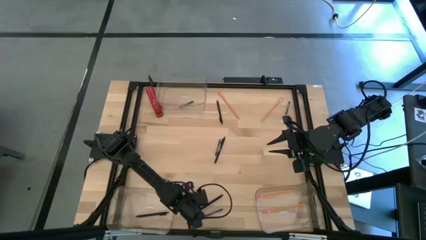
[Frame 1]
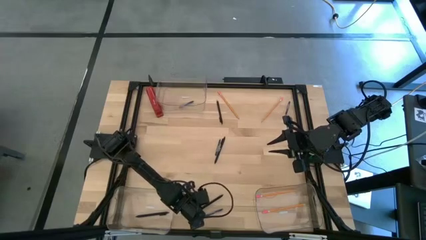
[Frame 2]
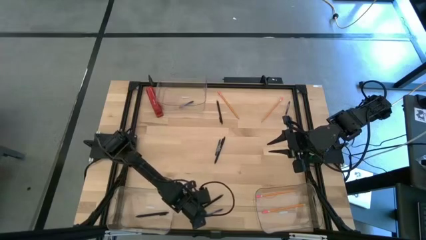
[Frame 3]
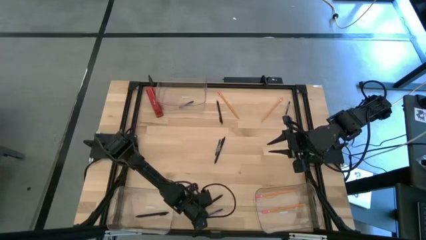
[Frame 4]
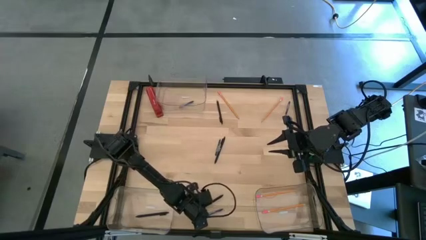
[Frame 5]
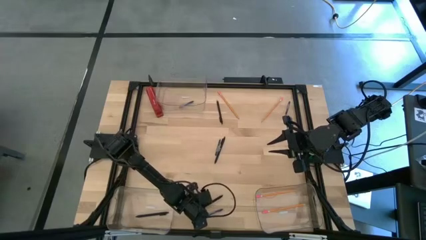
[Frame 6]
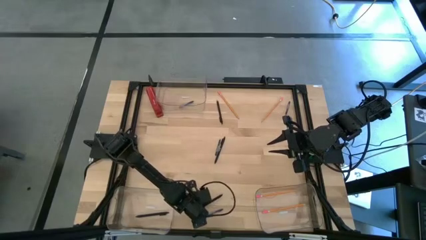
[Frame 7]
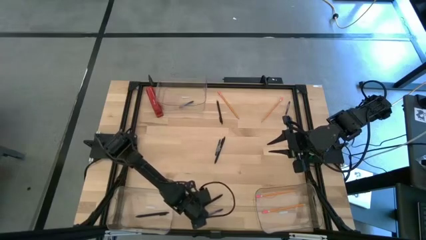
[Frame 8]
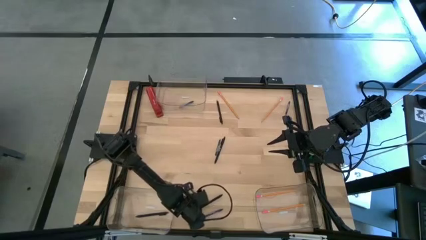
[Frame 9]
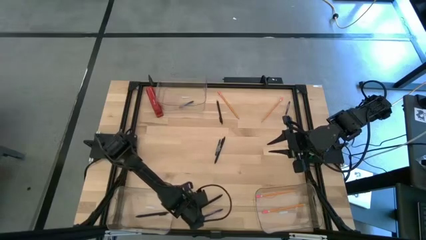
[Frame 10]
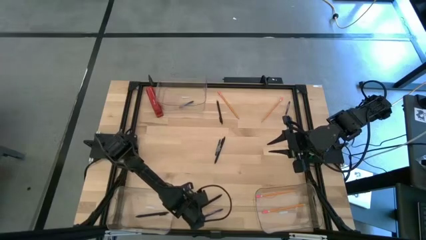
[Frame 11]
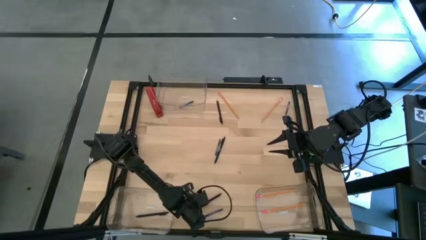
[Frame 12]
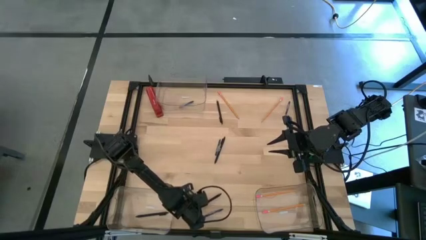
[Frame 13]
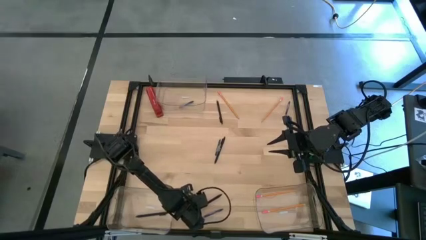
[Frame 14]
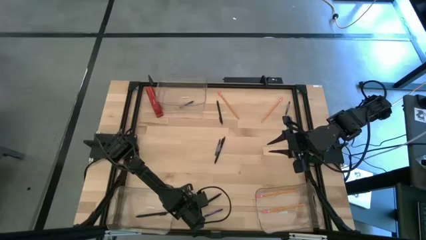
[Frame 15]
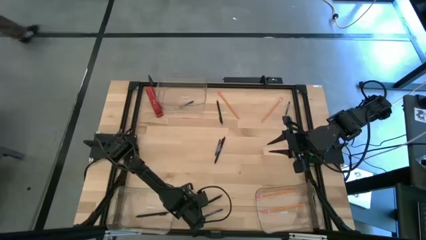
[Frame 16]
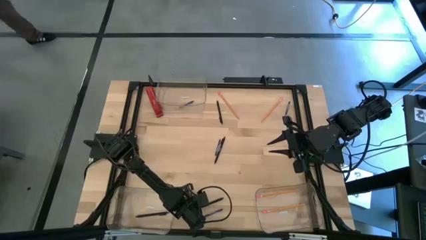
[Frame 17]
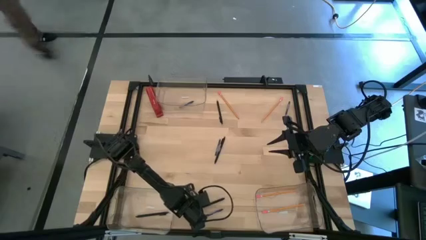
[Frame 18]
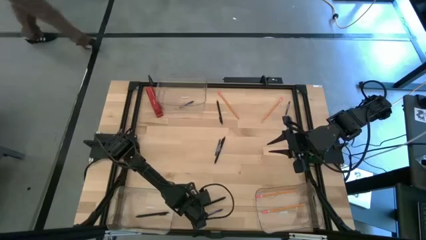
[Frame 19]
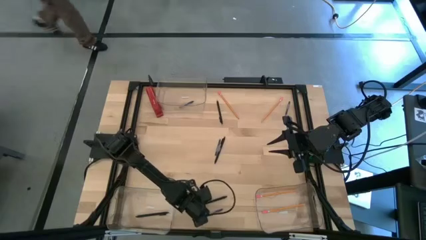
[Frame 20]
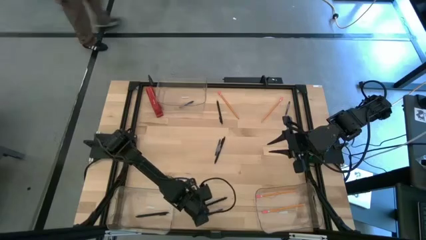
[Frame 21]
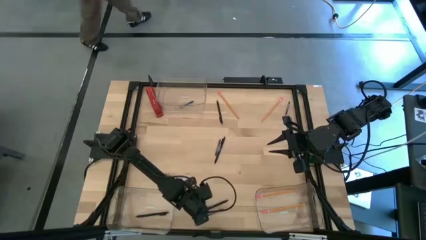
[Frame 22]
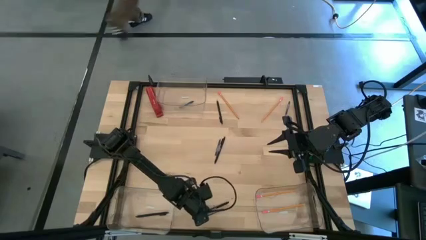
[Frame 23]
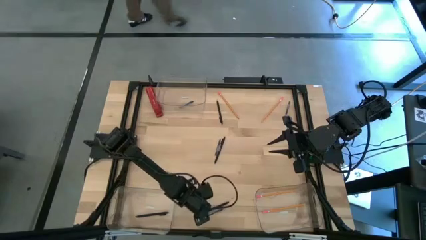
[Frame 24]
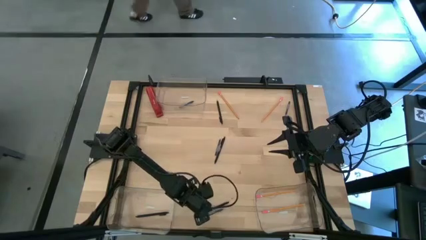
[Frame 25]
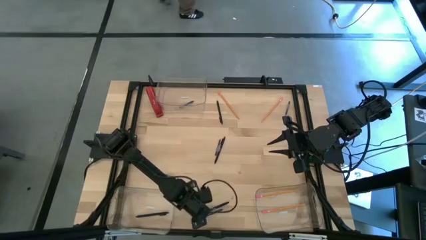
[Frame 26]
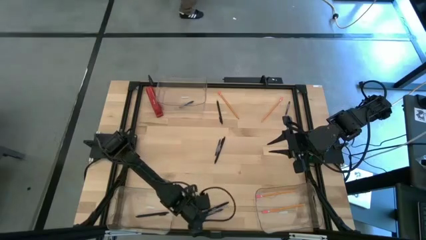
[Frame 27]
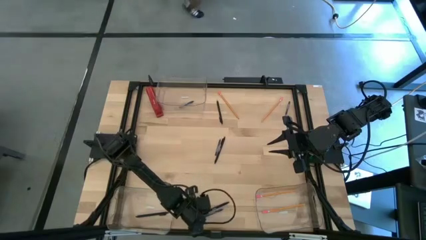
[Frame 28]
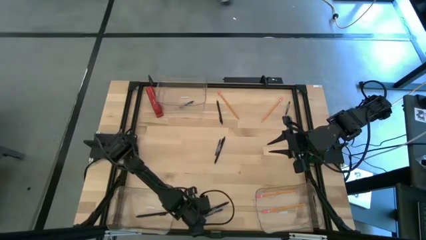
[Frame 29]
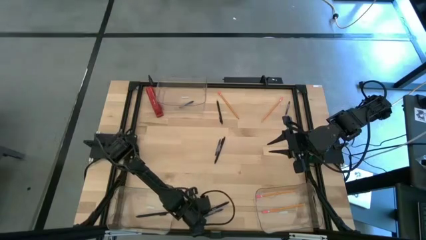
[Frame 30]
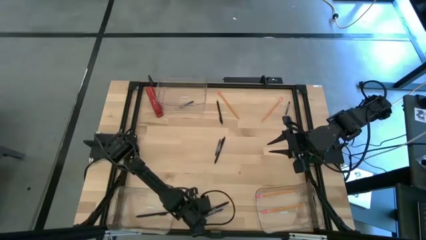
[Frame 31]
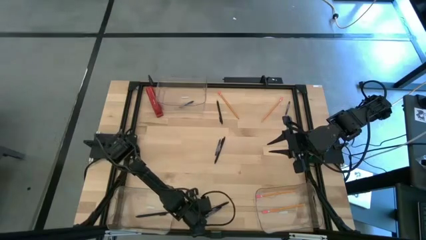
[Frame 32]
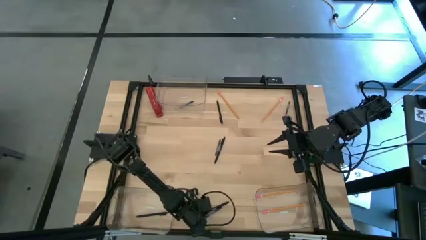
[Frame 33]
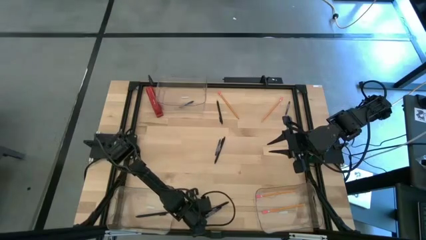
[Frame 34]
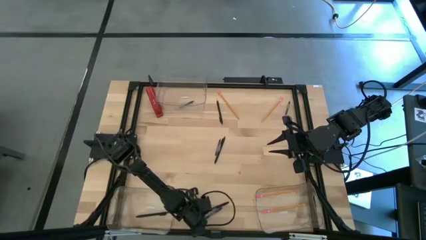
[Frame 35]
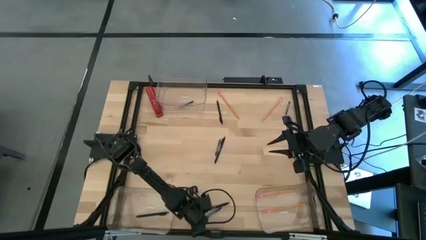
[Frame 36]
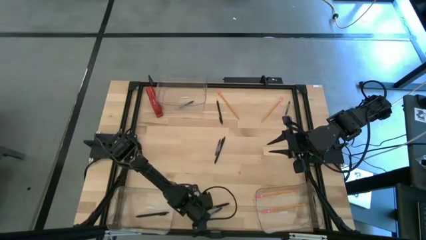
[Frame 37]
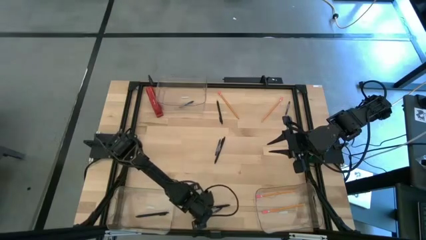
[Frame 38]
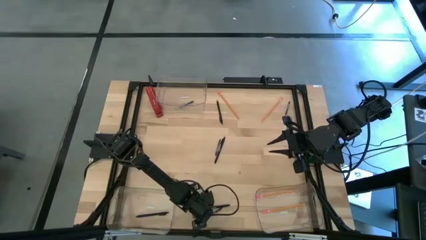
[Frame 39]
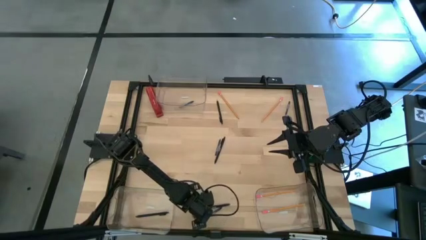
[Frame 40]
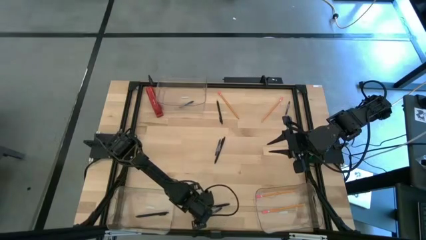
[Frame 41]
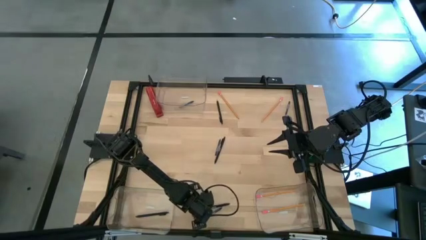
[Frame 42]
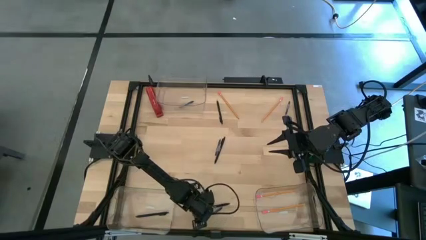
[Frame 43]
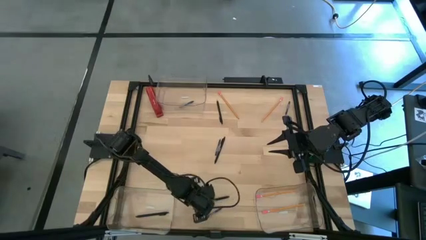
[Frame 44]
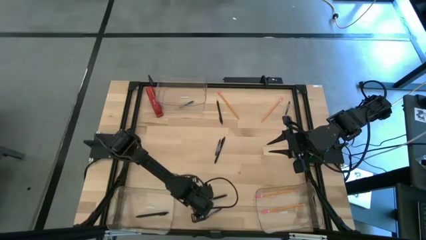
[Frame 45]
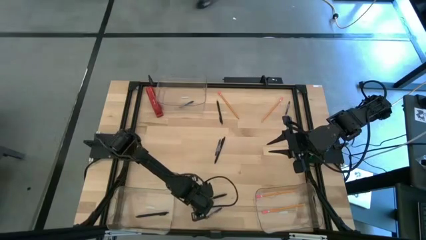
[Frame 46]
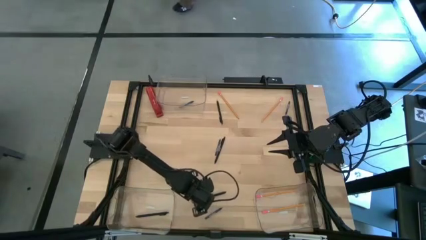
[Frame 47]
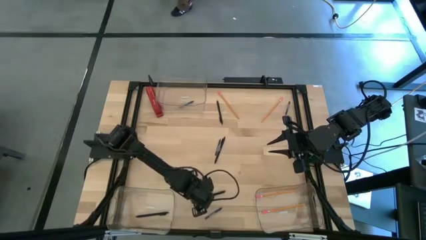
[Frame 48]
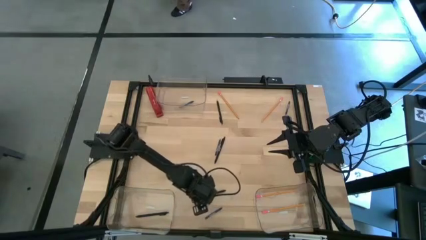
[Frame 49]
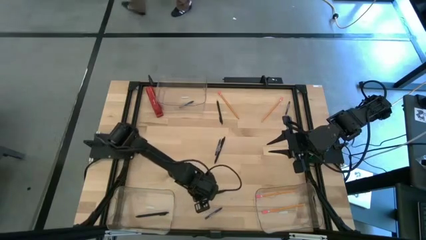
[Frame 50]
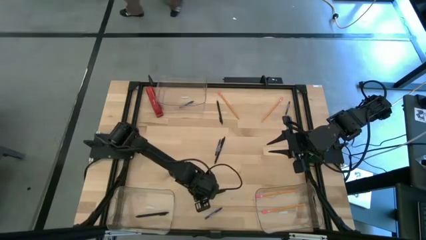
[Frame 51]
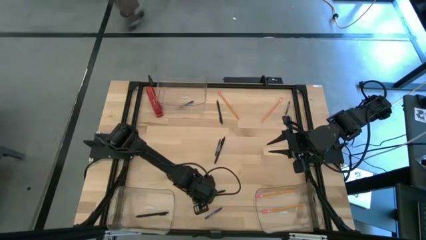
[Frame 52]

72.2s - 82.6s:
Task: Sort crayons/erasers/pens/pencils in bins
Put the black pen into the bottom left transparent bin

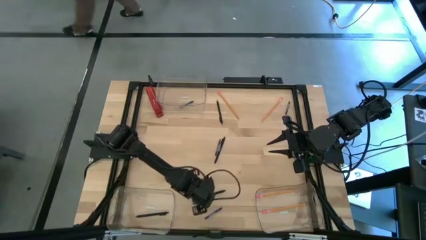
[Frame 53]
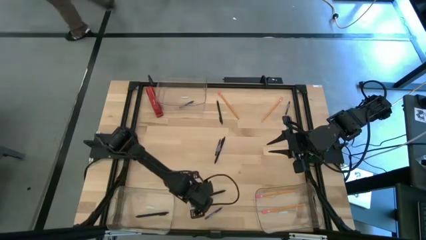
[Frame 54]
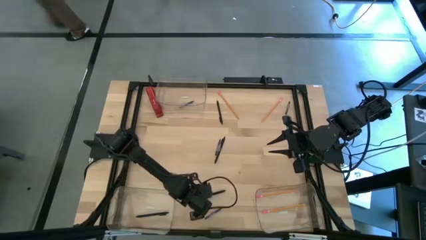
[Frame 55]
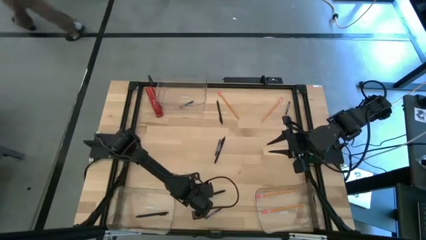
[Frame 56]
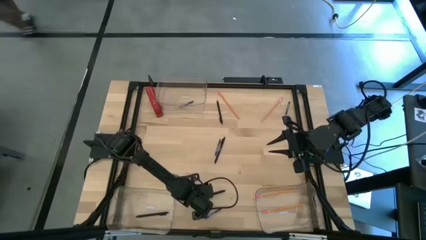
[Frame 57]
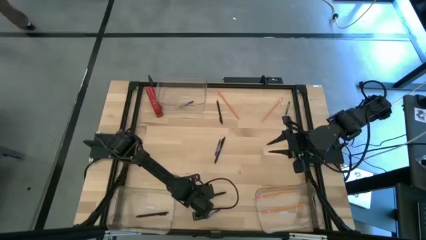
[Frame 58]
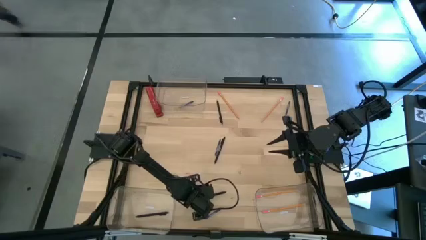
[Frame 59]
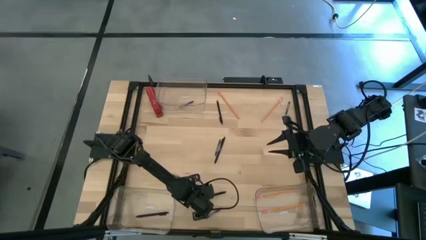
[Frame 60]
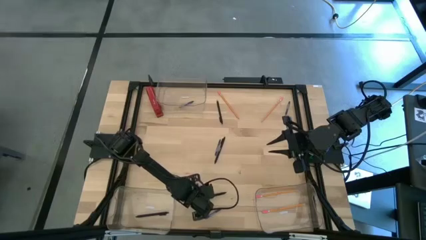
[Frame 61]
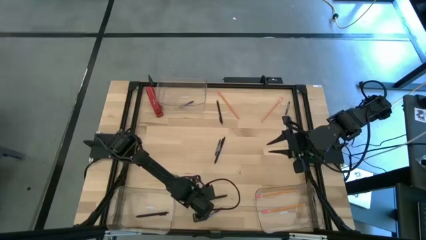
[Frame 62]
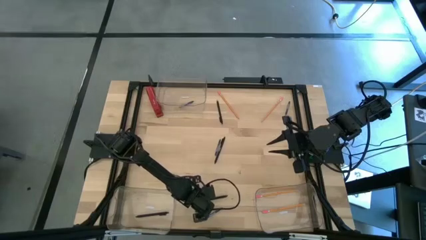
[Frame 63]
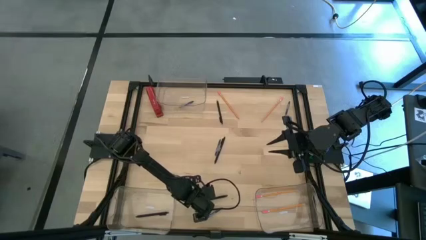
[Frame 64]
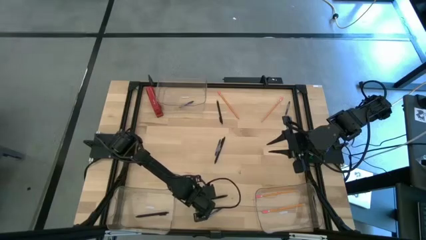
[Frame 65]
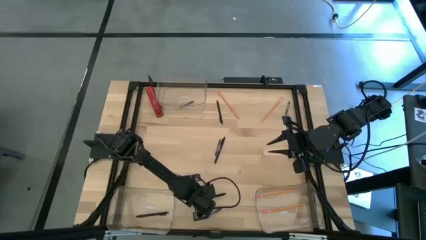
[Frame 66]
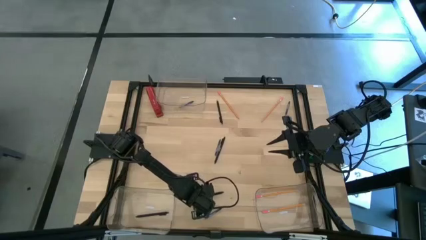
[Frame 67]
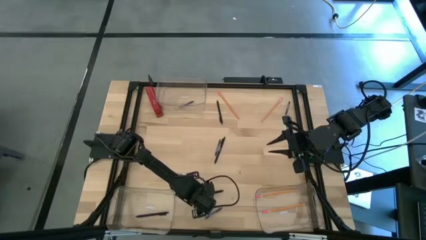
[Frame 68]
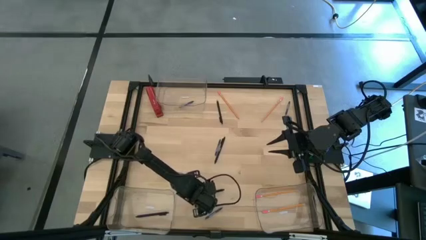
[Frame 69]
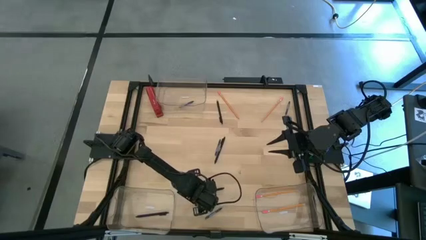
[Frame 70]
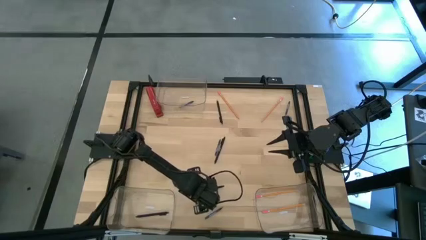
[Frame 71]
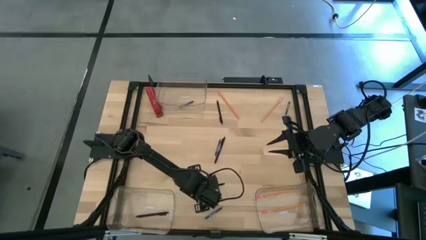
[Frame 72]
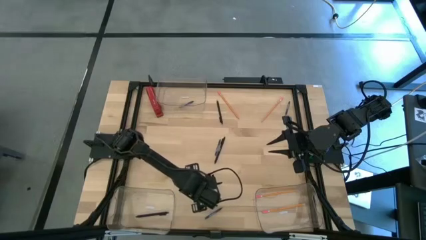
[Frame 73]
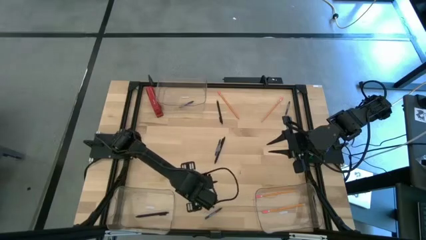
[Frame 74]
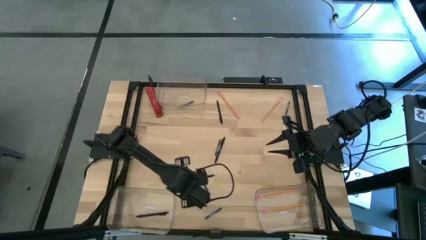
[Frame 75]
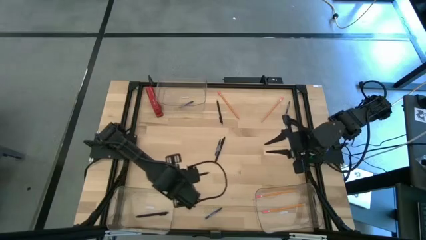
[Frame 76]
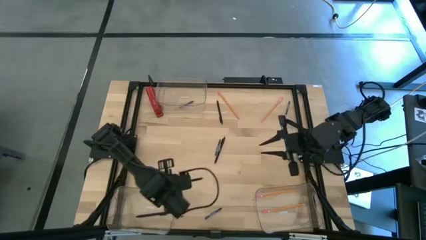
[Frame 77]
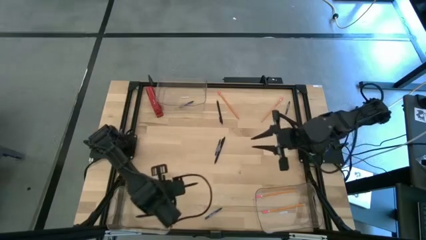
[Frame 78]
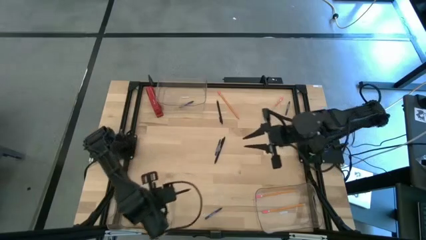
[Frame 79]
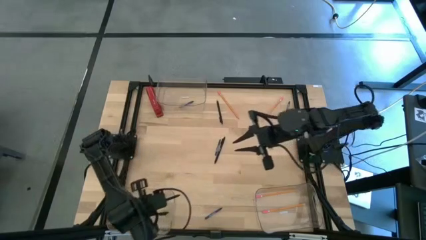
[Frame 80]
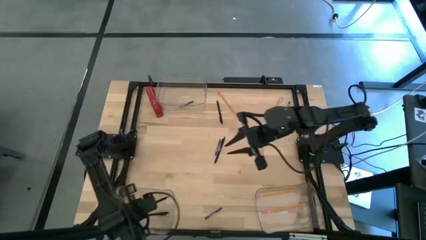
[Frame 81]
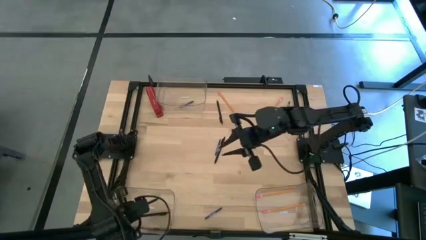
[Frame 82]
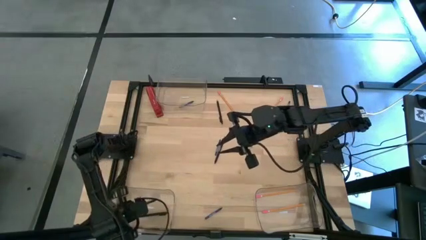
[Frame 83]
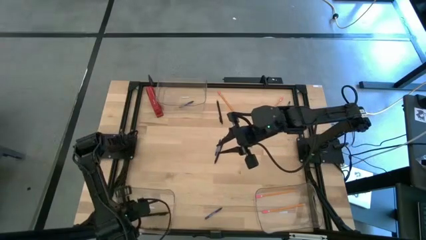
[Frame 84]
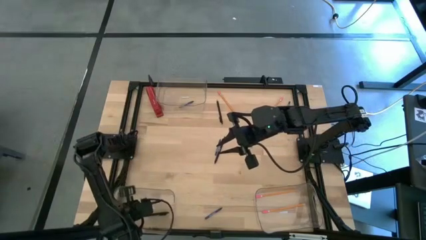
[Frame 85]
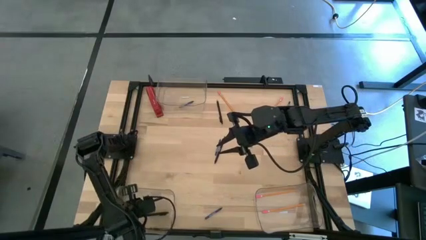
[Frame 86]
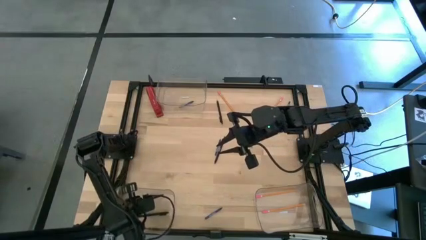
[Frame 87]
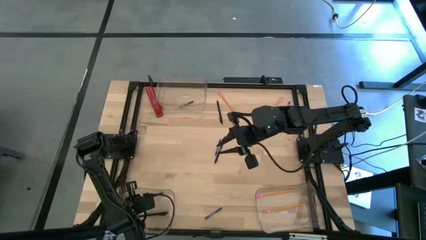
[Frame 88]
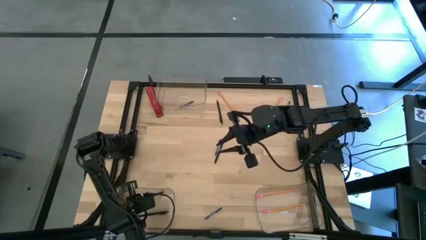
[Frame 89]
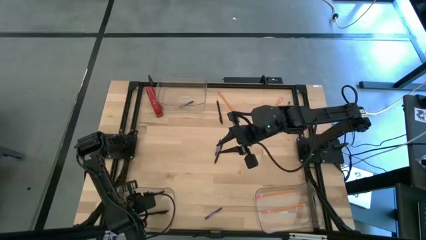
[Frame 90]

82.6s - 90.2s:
Put the black pen into the bottom left transparent bin
